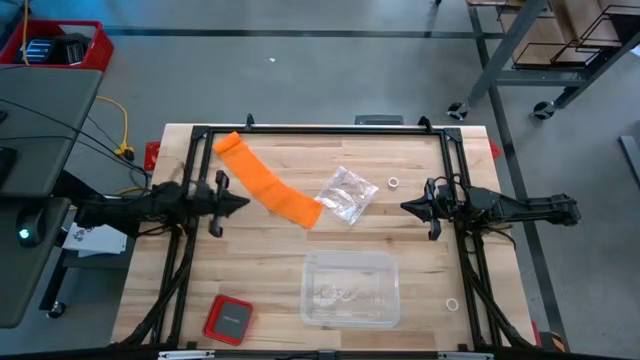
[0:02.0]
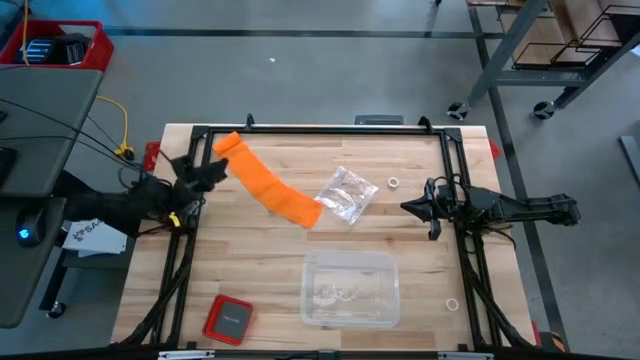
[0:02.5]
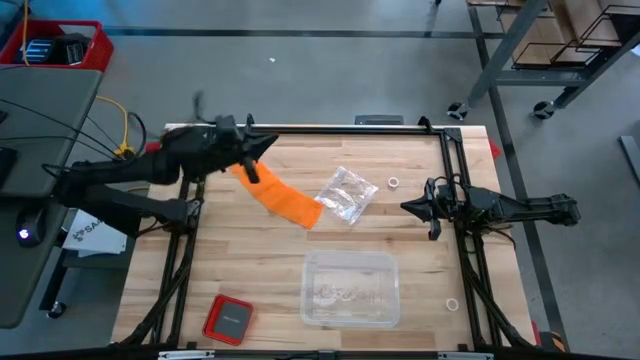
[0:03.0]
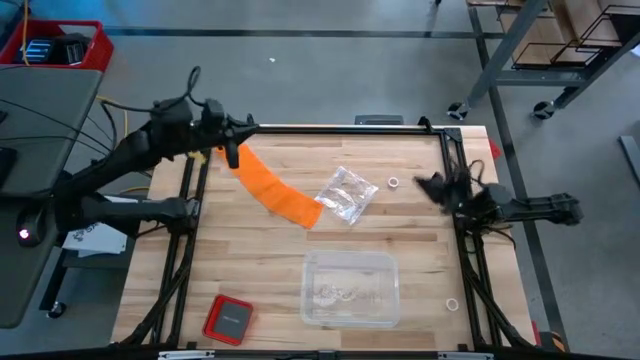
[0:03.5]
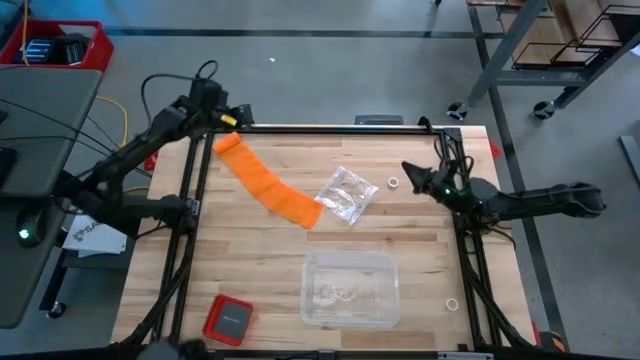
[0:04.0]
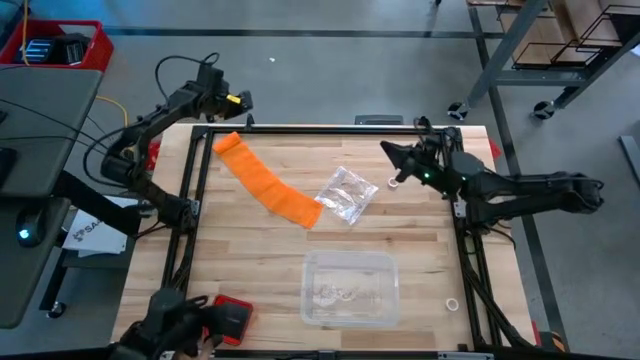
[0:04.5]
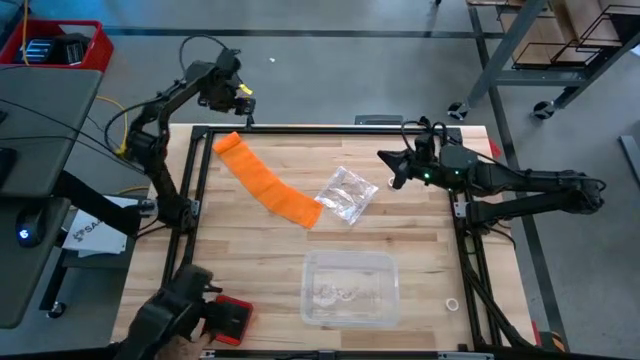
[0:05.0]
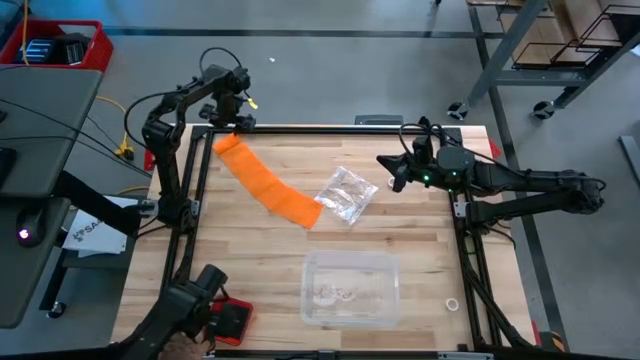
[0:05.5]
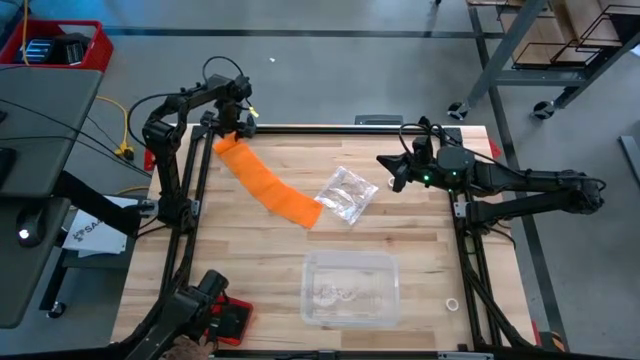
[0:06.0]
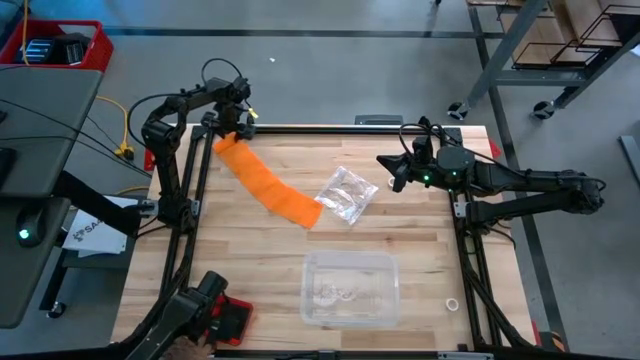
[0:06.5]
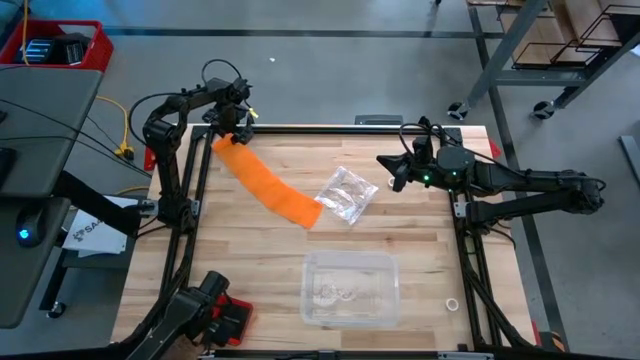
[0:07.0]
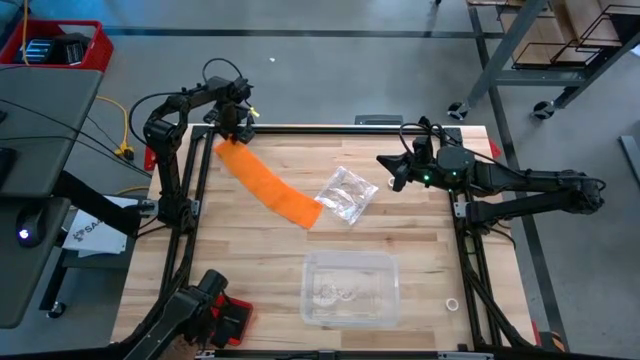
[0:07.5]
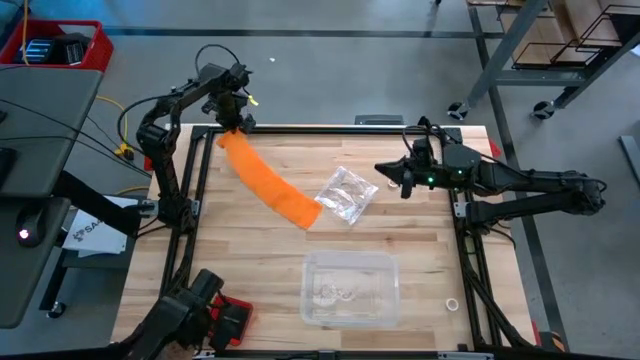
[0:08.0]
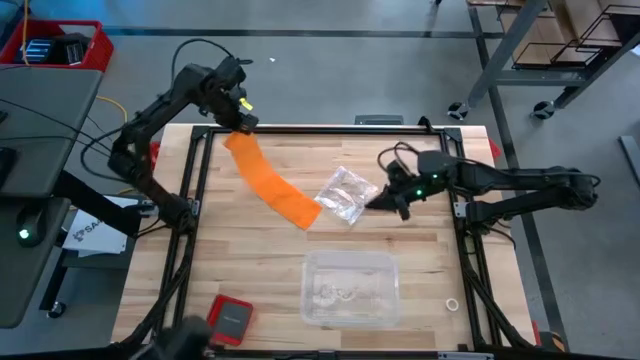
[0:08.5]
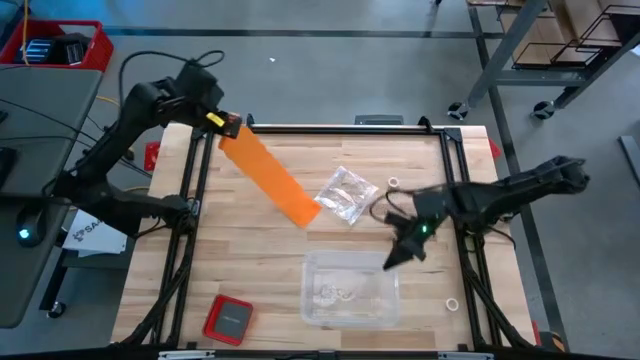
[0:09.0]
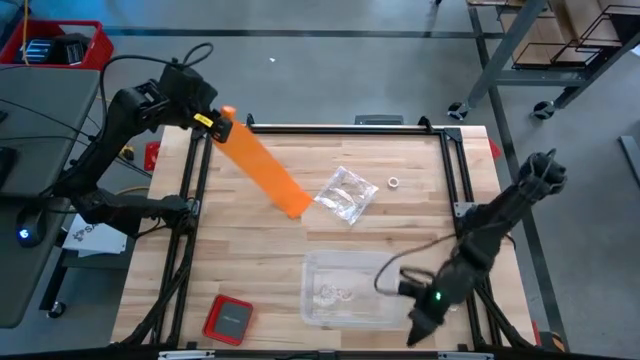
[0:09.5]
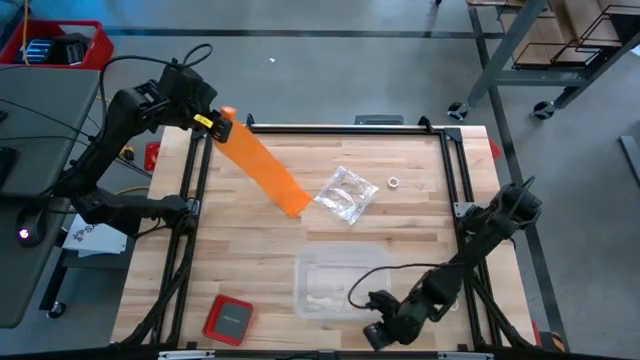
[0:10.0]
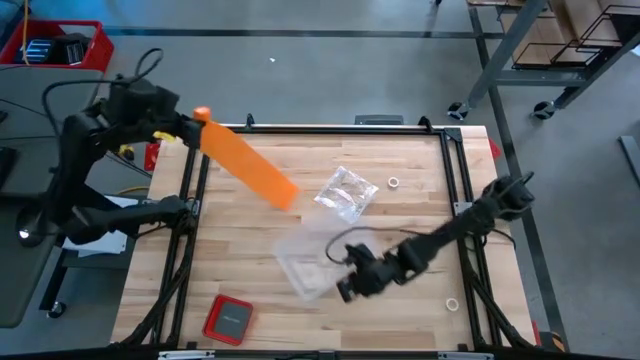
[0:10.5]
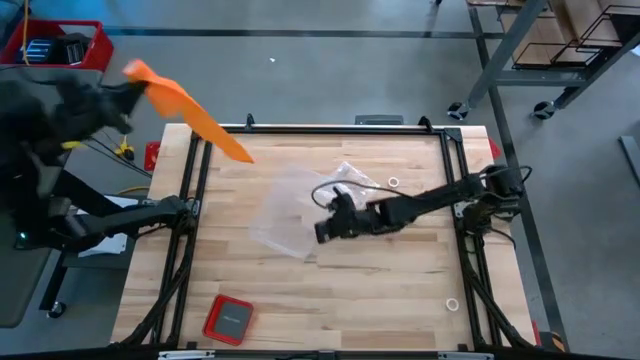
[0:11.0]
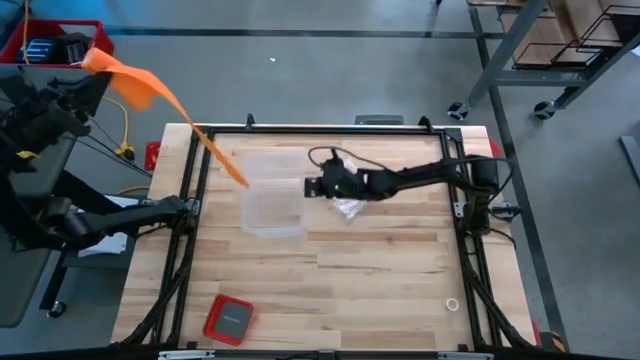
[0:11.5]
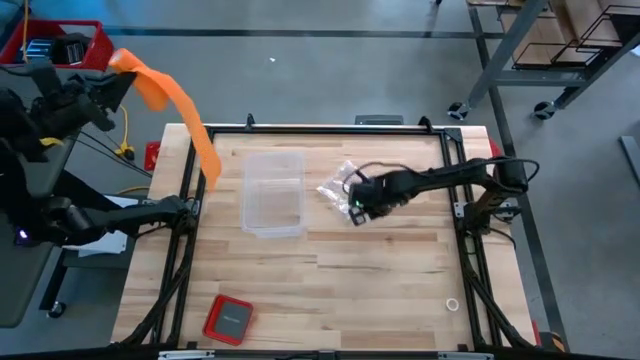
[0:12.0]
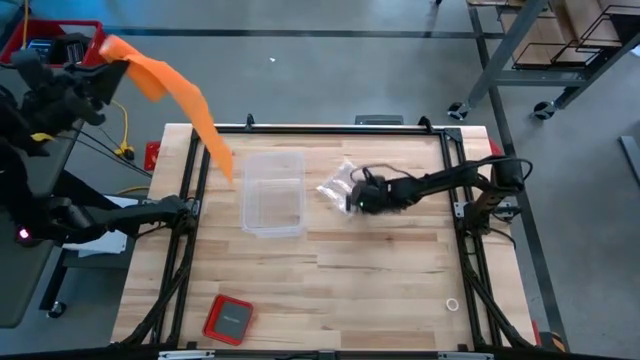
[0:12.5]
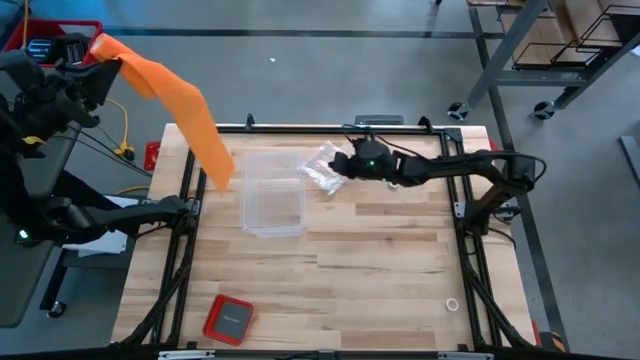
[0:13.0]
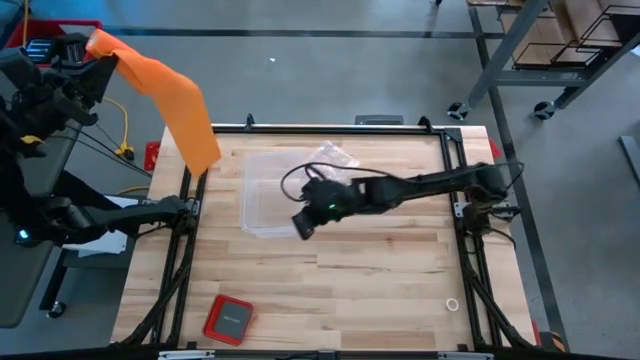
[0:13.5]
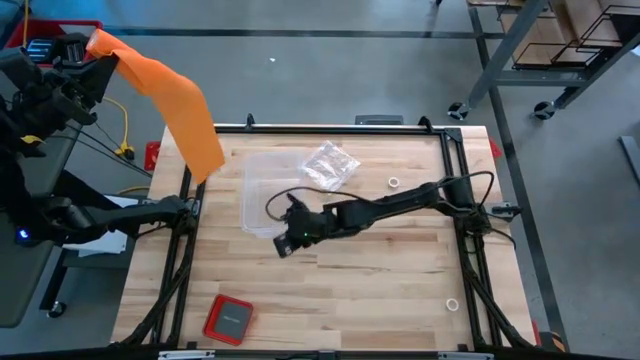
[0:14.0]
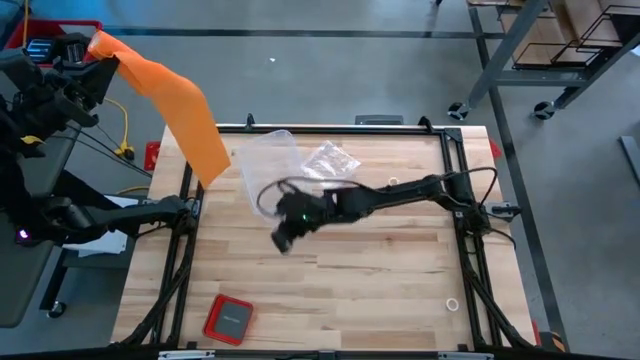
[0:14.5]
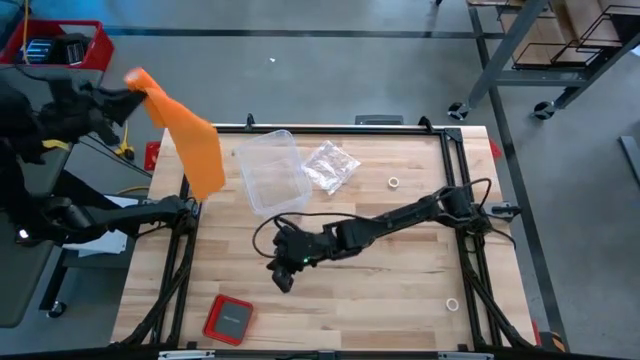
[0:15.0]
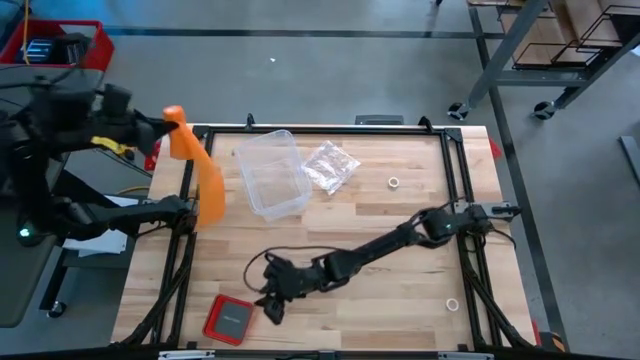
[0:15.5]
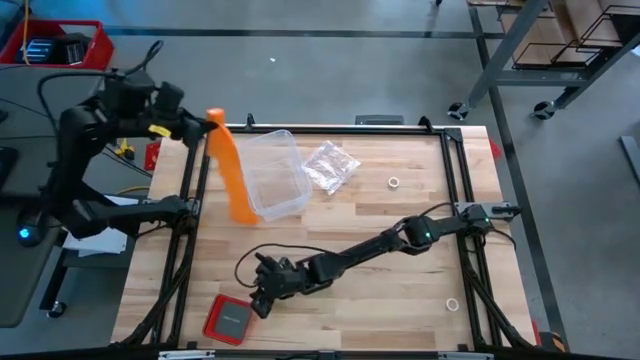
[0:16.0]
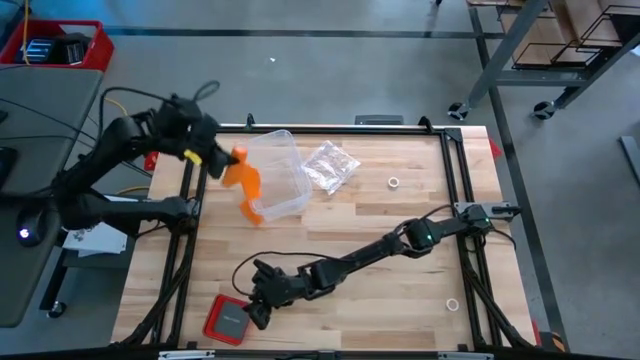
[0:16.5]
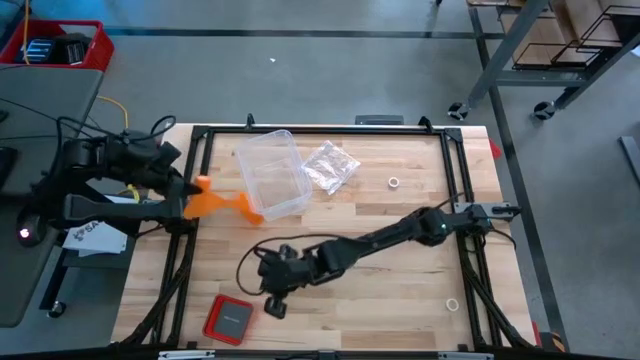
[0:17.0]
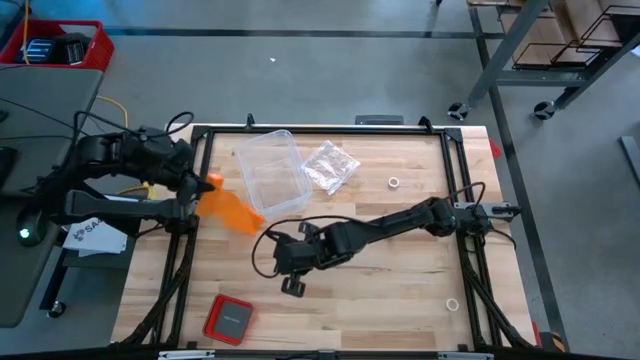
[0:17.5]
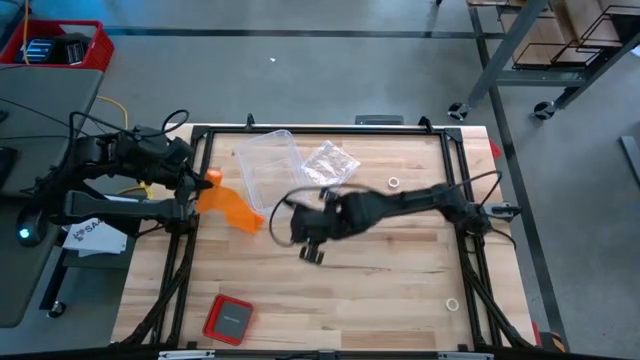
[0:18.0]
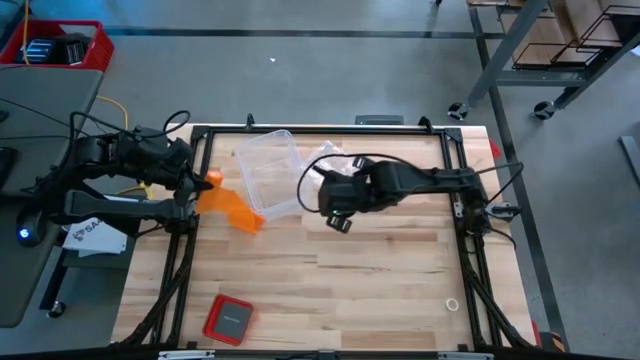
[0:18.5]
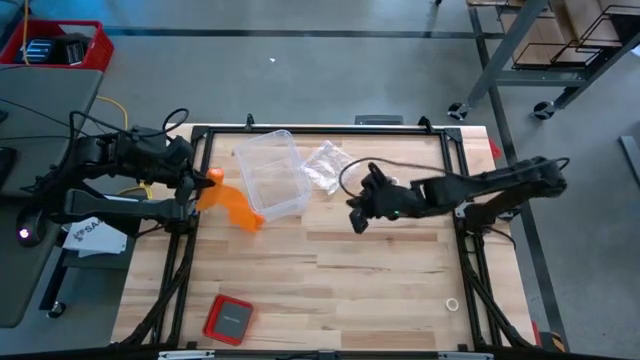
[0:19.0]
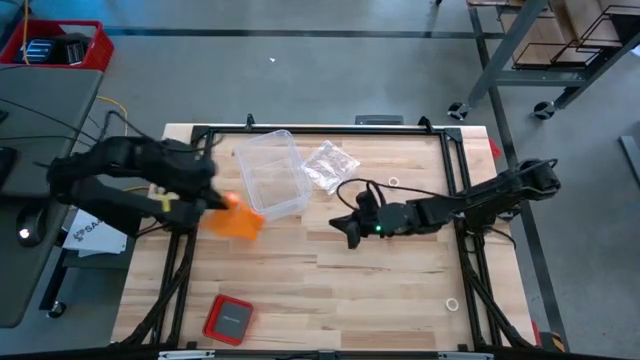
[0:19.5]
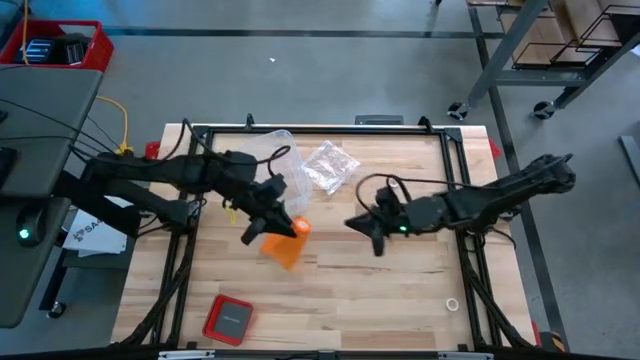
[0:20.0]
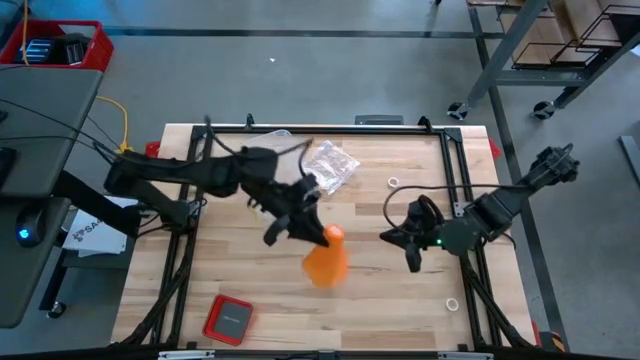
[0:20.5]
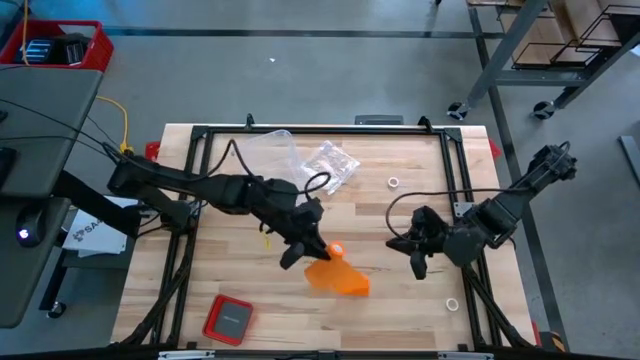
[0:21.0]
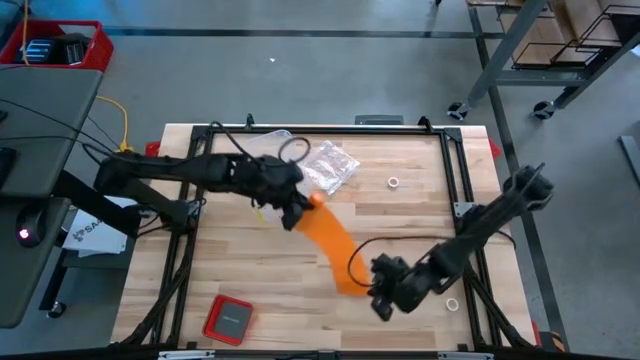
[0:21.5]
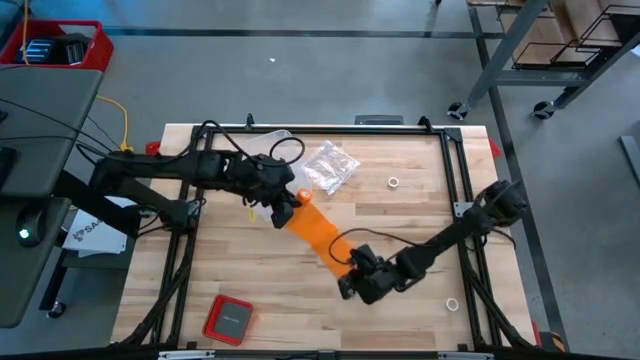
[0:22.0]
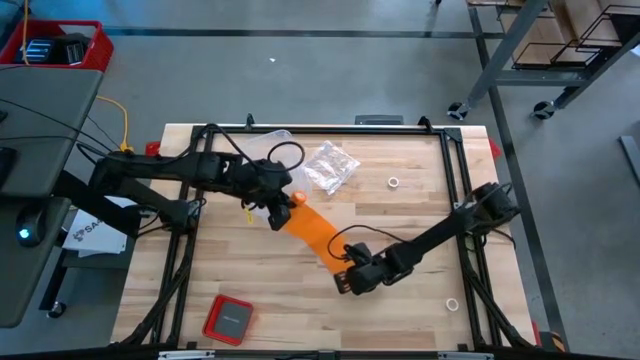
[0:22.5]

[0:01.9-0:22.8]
Task: Roll bandage
Roll the orange bandage
